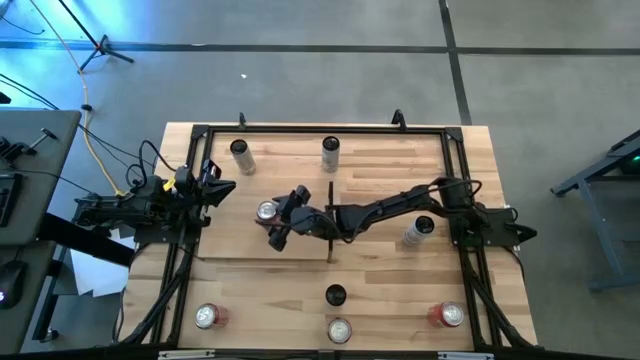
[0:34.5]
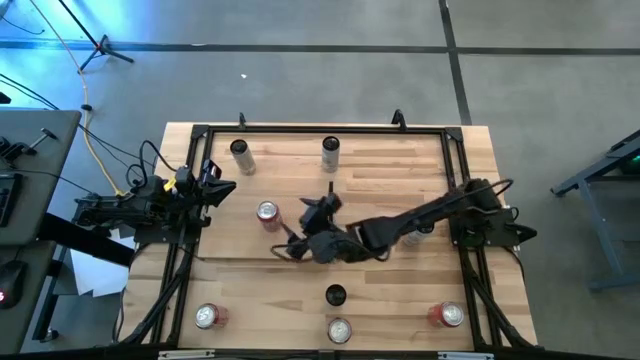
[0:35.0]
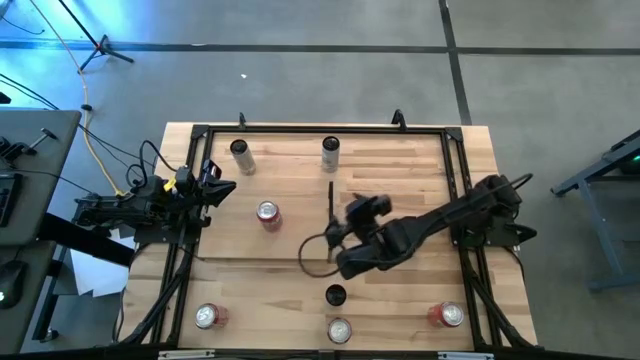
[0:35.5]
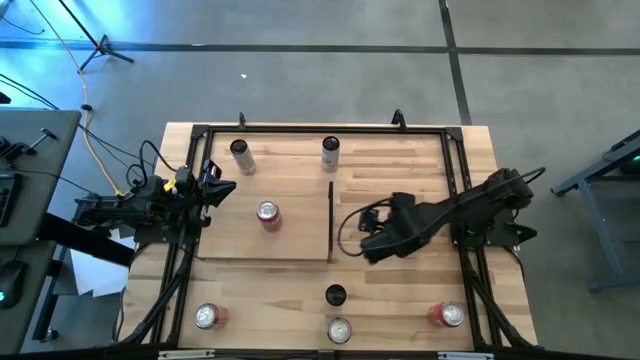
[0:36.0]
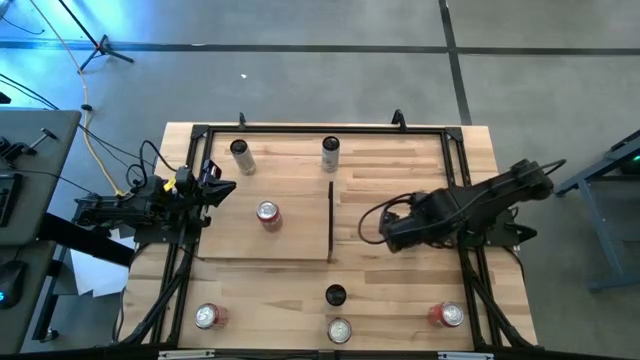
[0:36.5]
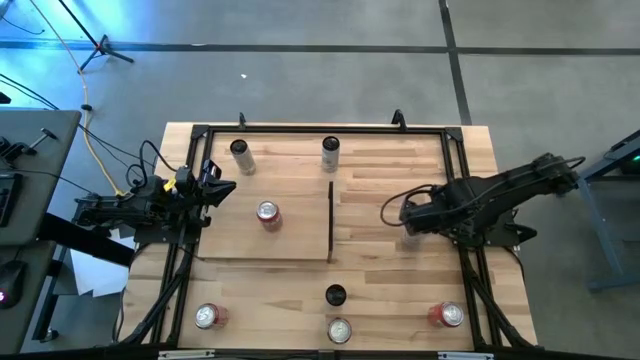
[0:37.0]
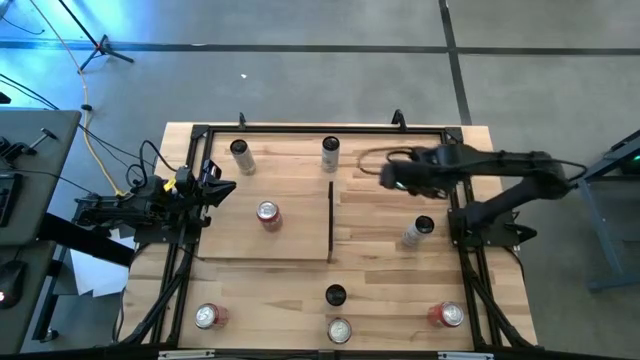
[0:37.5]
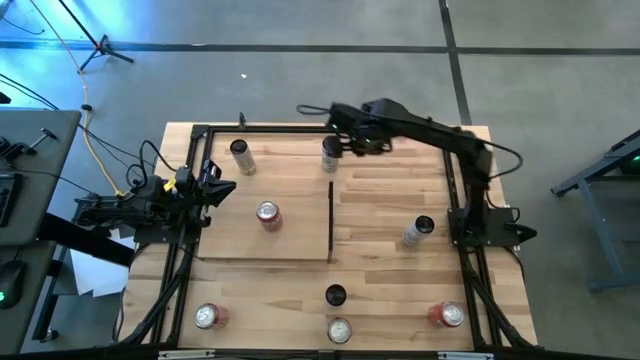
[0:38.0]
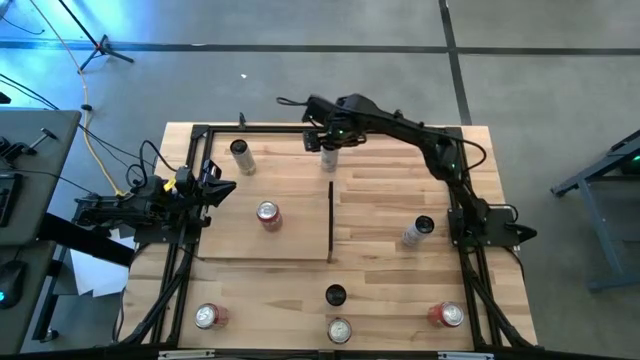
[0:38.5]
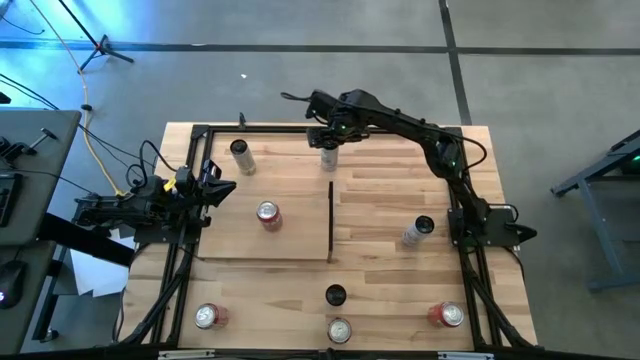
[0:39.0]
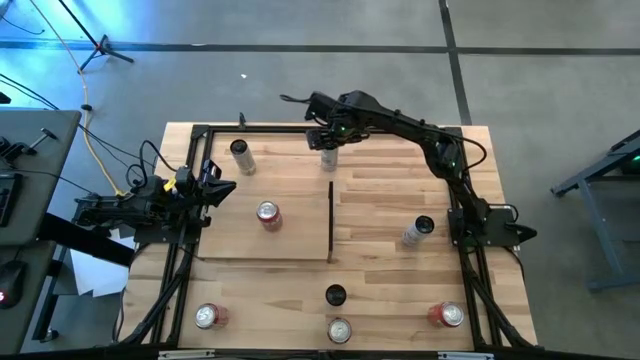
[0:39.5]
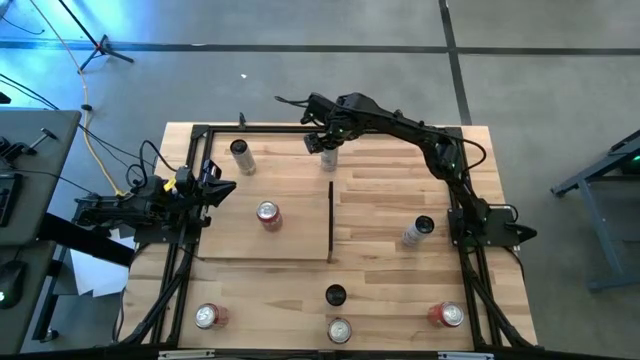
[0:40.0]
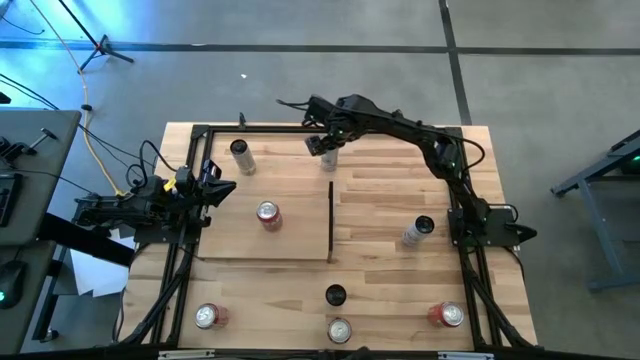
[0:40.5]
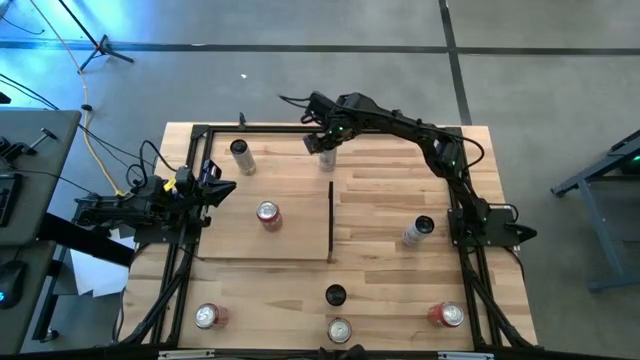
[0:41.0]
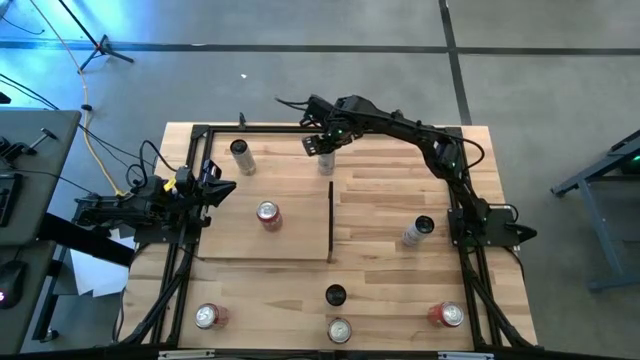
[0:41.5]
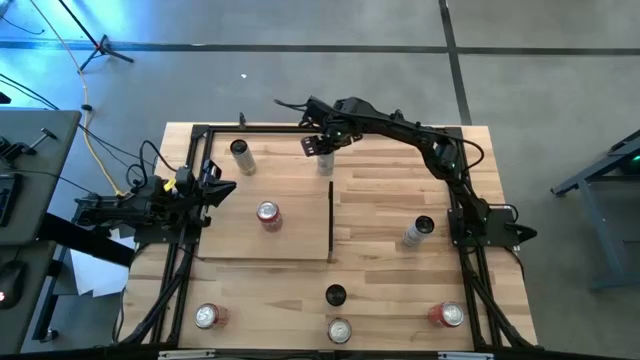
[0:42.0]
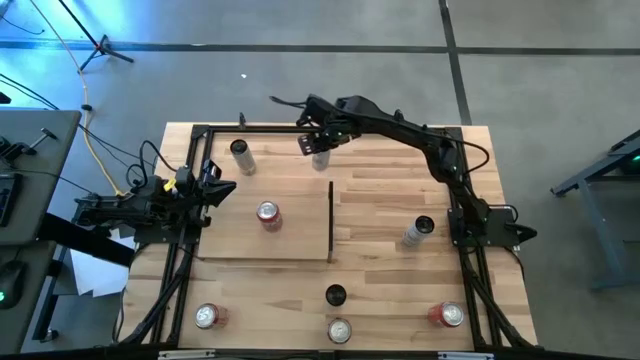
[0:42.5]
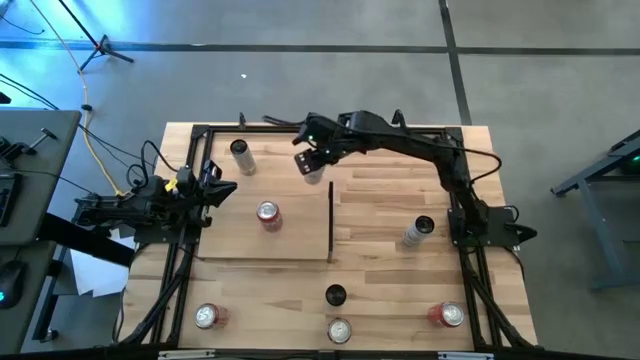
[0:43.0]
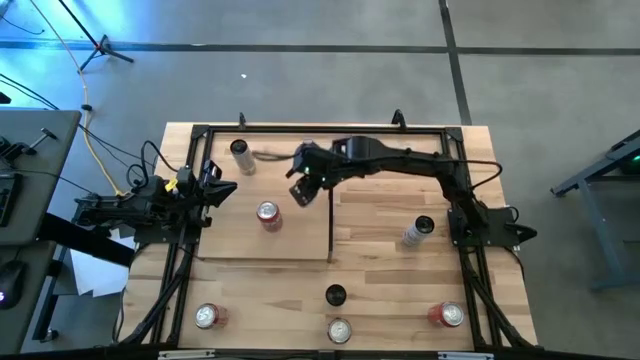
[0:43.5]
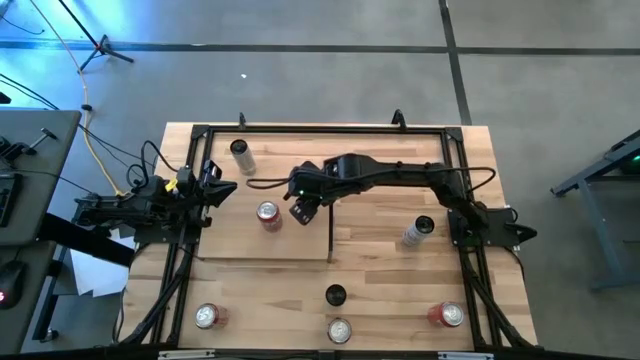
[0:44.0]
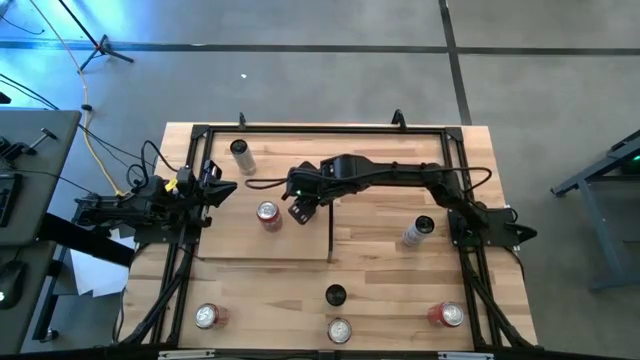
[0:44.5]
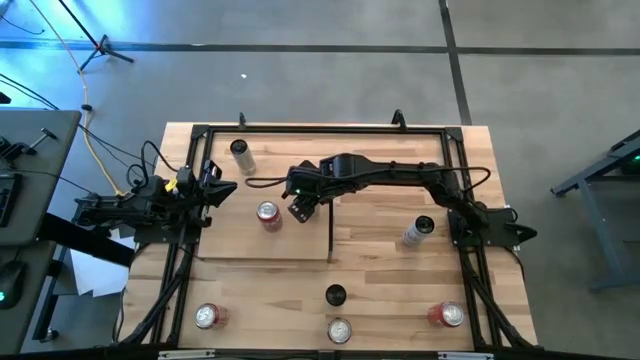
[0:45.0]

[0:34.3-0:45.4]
Task: Place canned beverage on shelf
Put the top white blue soda can on the shelf

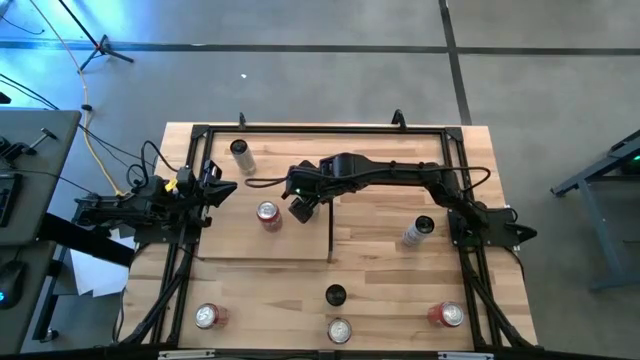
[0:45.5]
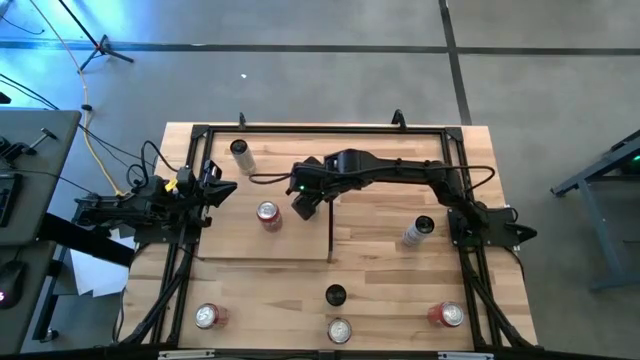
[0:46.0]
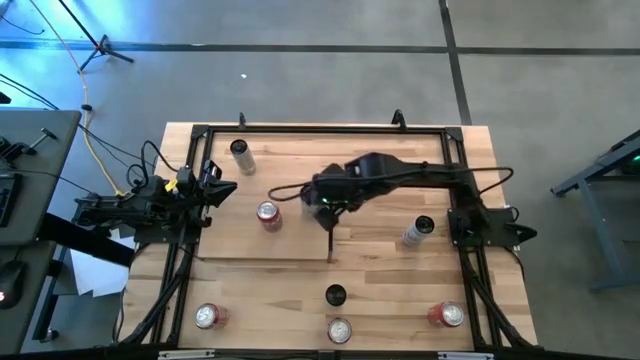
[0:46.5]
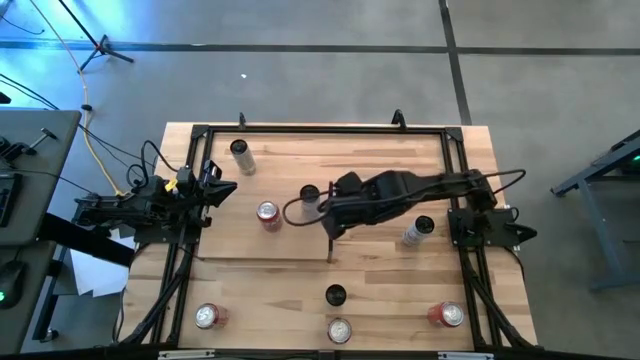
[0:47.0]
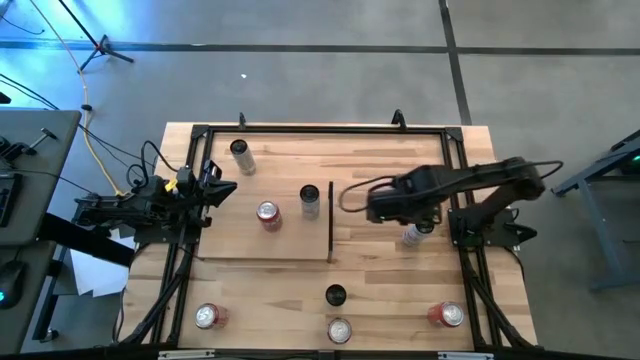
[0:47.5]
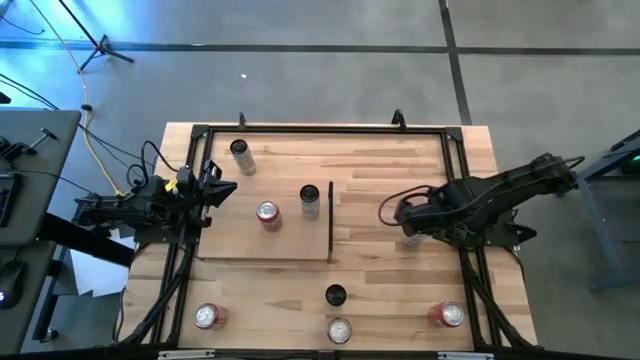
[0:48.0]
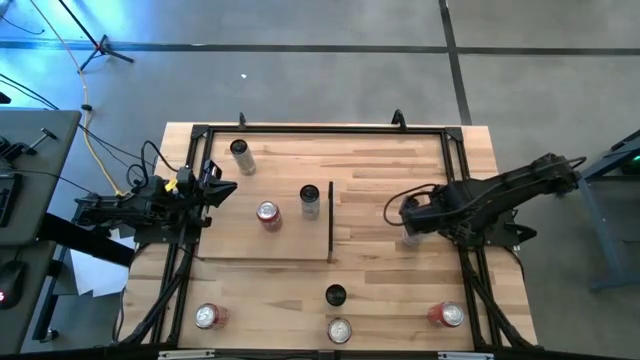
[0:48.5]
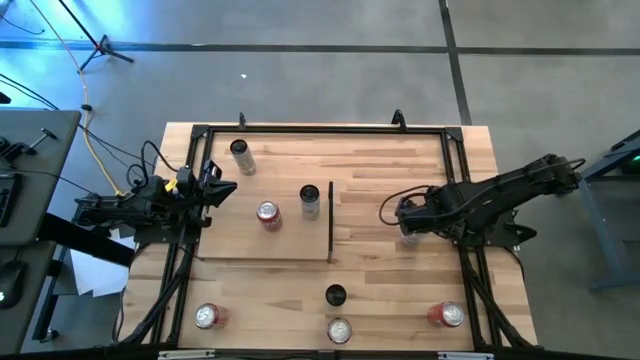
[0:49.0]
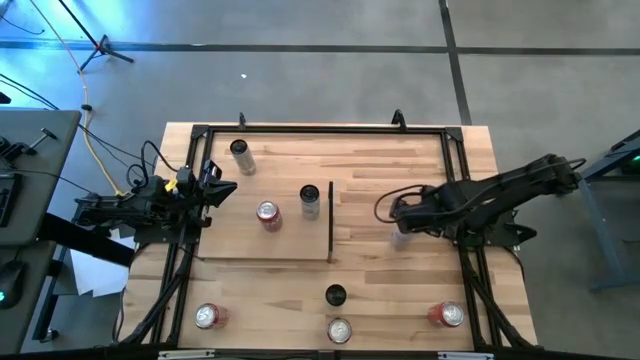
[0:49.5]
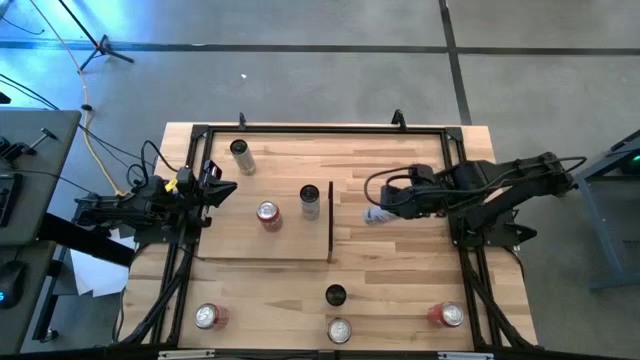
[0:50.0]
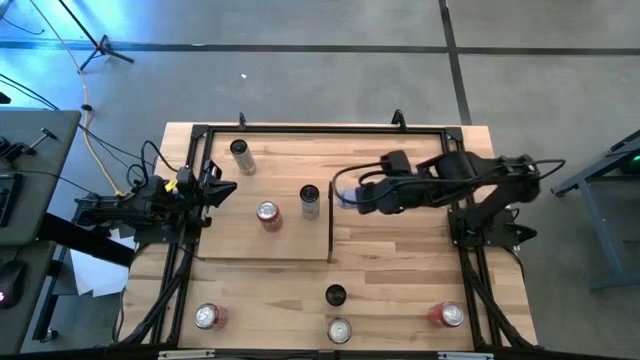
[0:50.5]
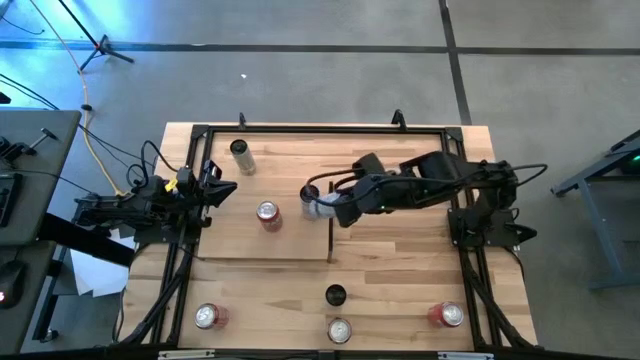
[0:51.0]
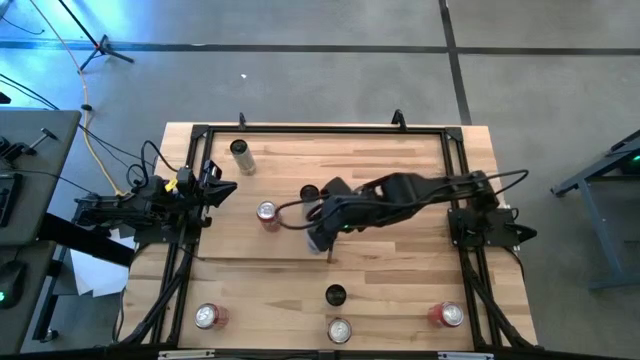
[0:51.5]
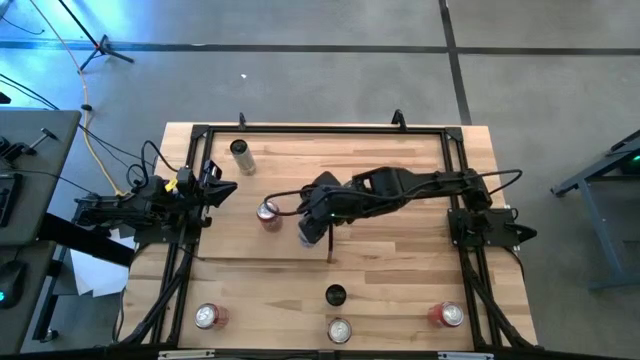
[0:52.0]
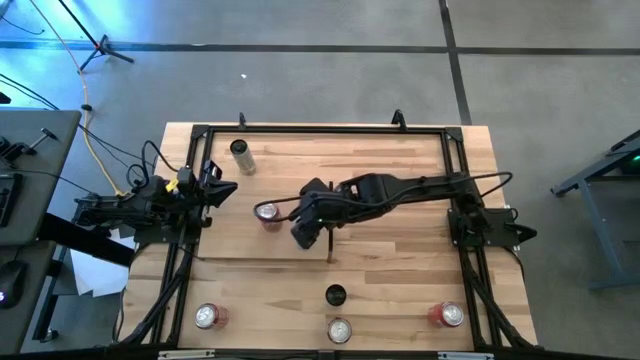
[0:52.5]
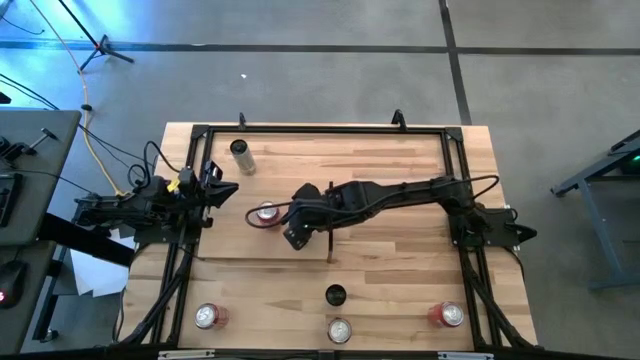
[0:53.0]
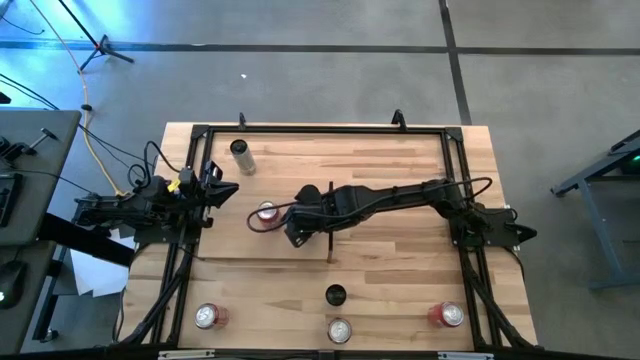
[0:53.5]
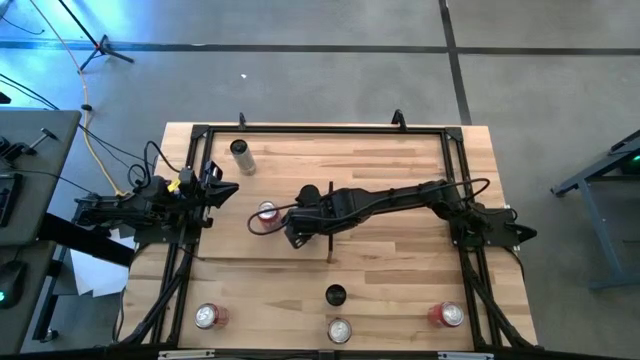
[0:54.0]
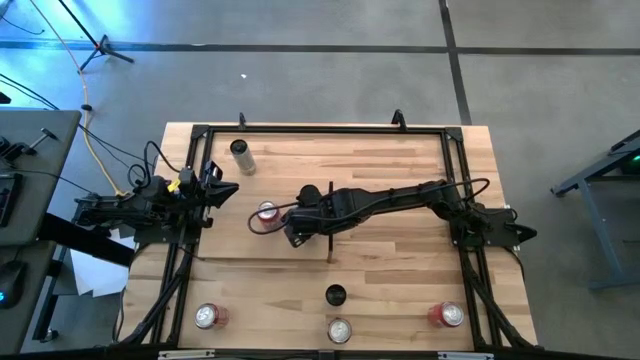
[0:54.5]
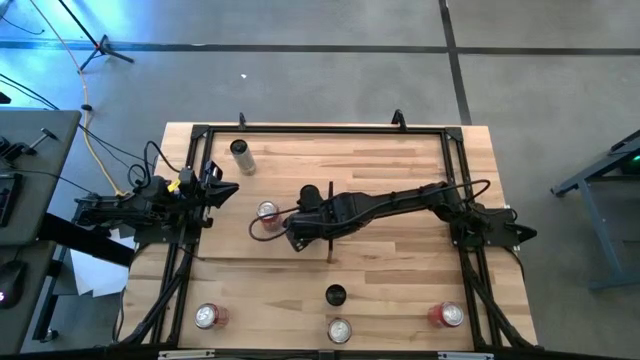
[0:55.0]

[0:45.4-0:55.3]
Put the white blue soda can aligned with the other white blue soda can on the shelf
